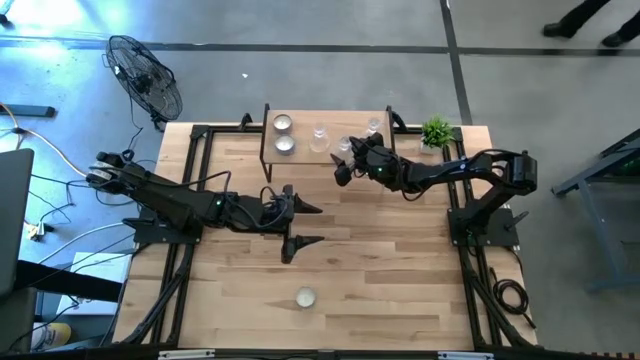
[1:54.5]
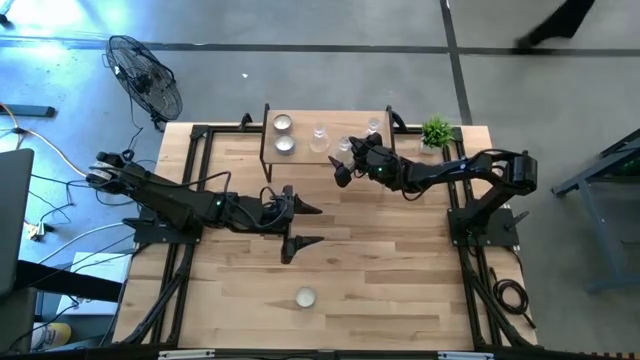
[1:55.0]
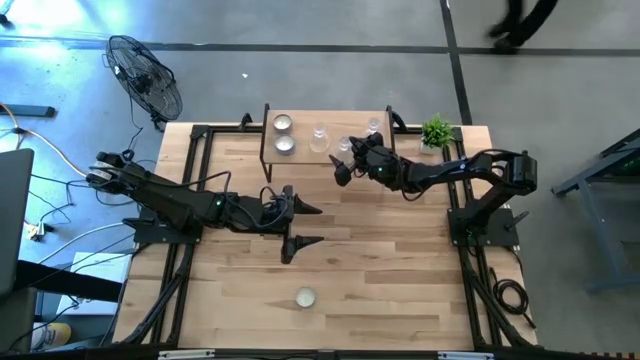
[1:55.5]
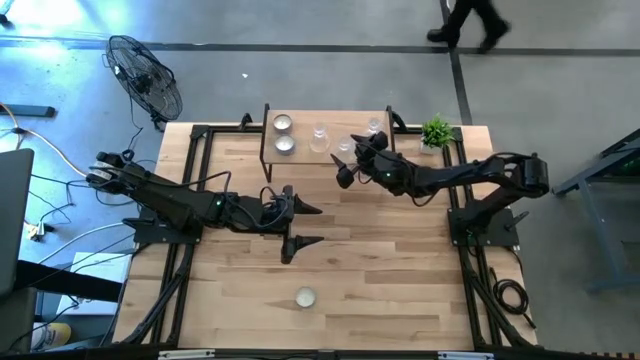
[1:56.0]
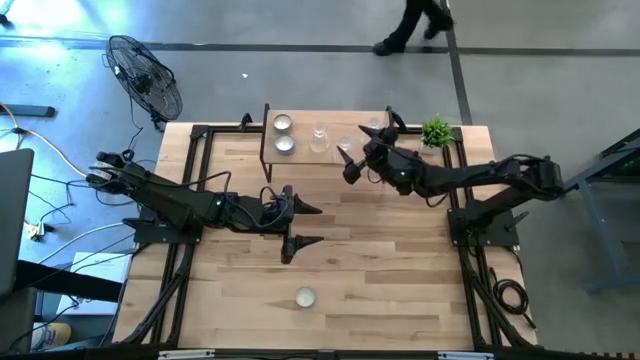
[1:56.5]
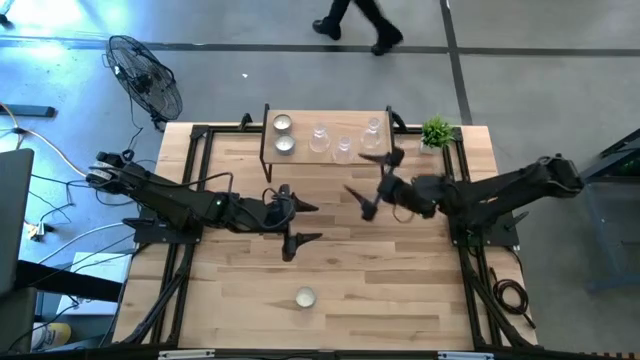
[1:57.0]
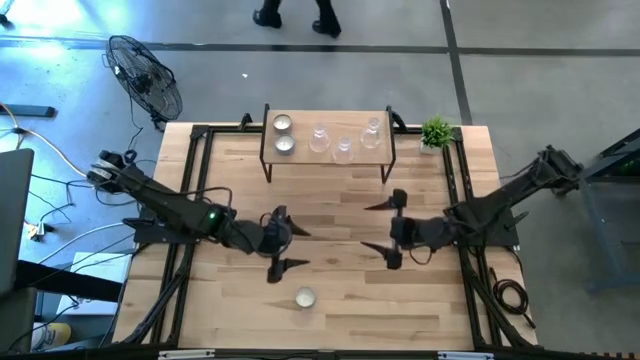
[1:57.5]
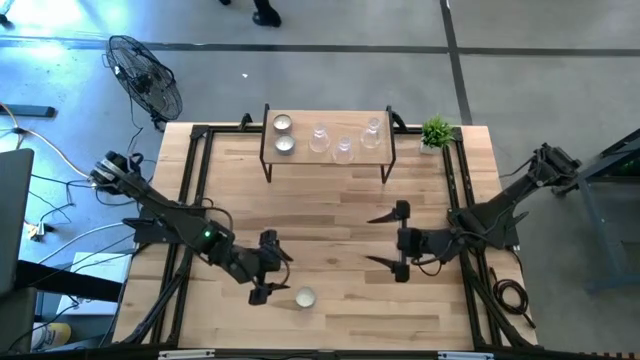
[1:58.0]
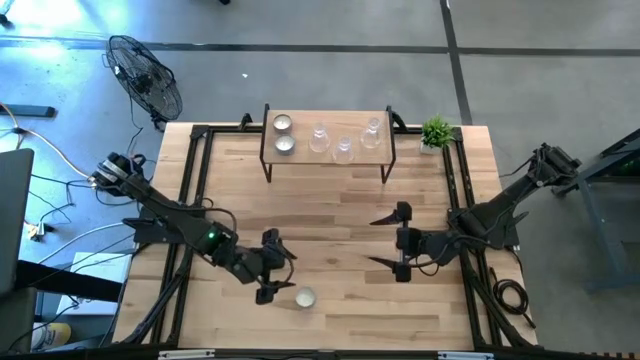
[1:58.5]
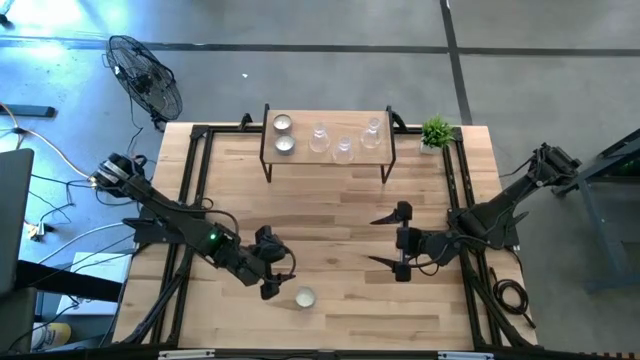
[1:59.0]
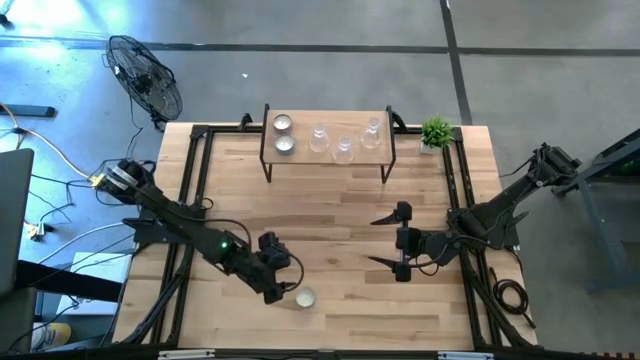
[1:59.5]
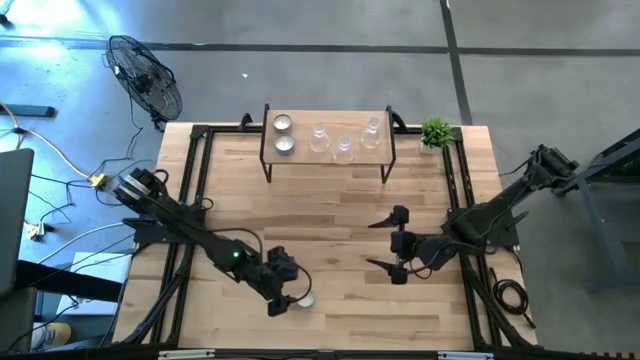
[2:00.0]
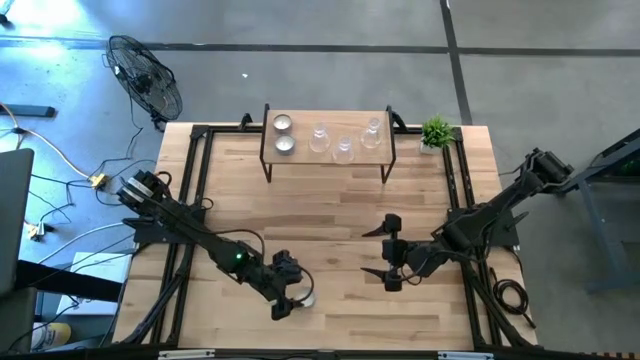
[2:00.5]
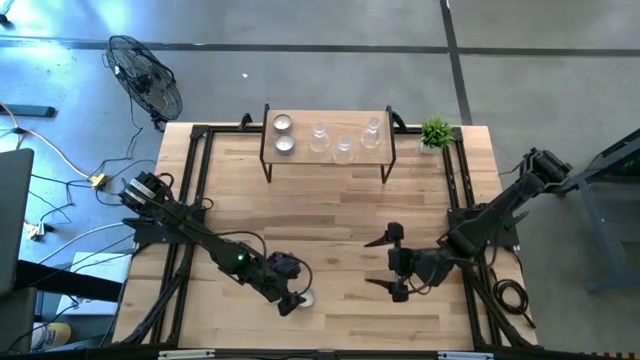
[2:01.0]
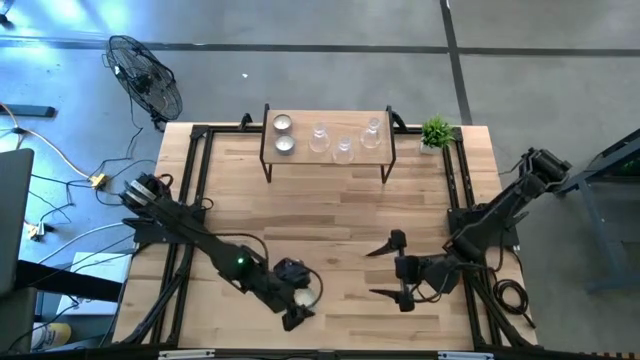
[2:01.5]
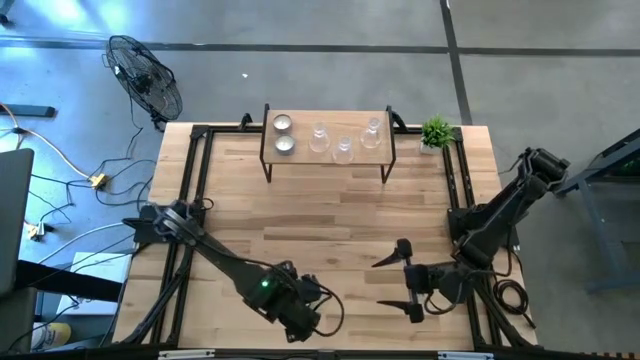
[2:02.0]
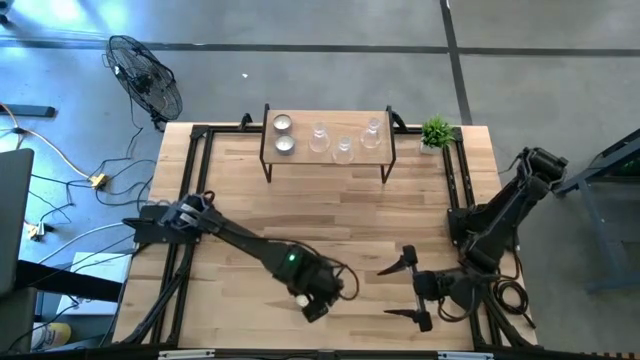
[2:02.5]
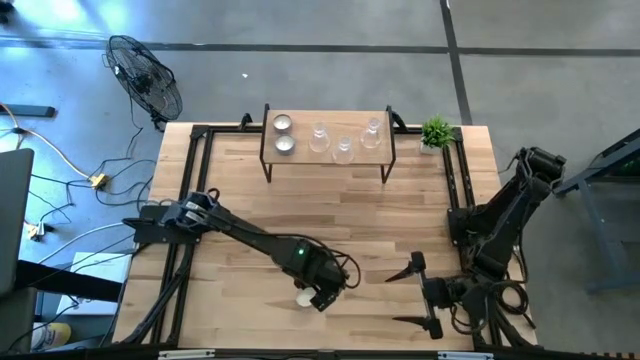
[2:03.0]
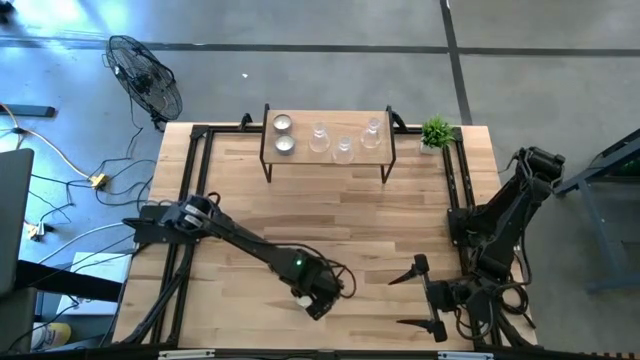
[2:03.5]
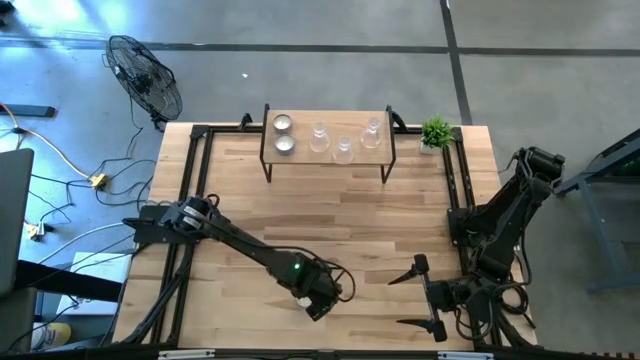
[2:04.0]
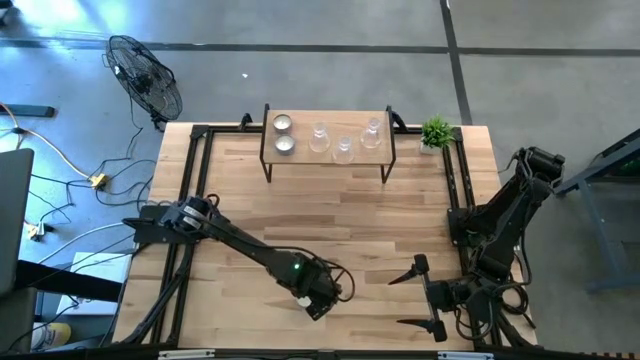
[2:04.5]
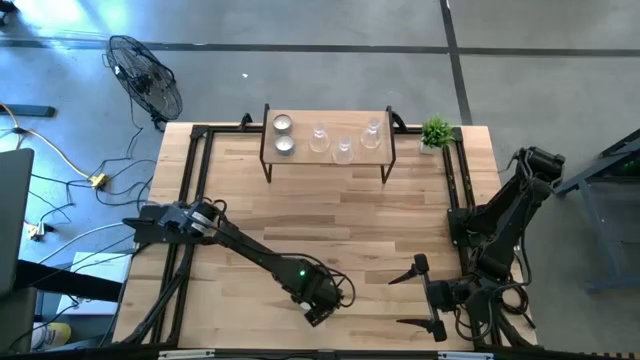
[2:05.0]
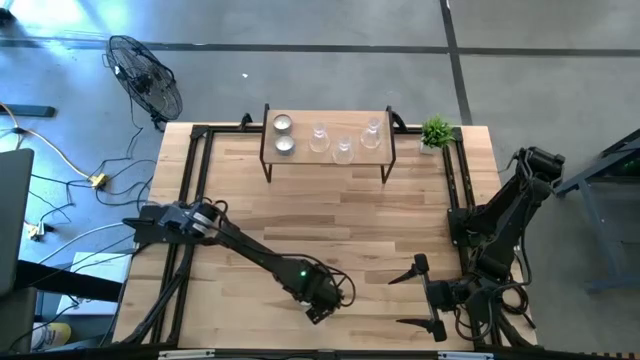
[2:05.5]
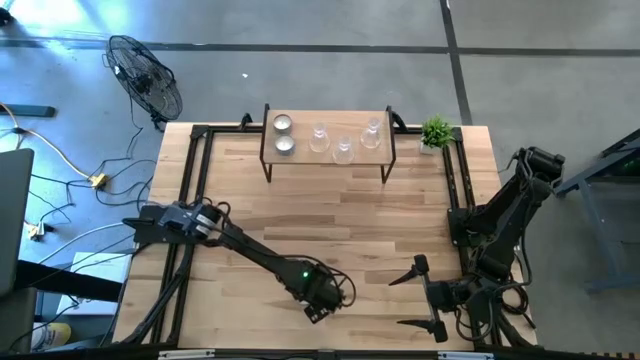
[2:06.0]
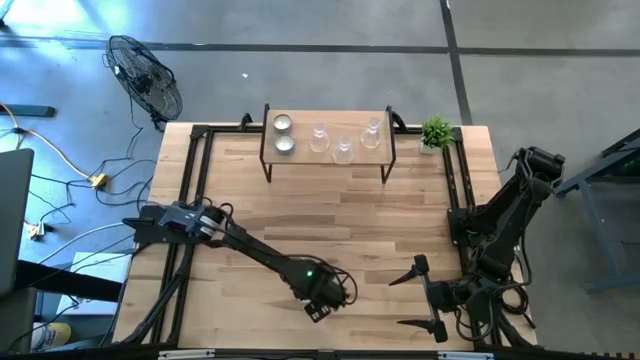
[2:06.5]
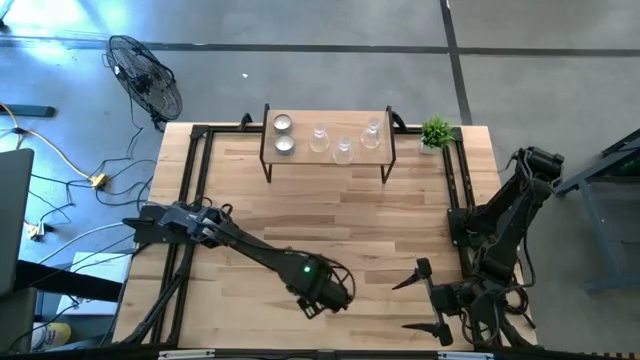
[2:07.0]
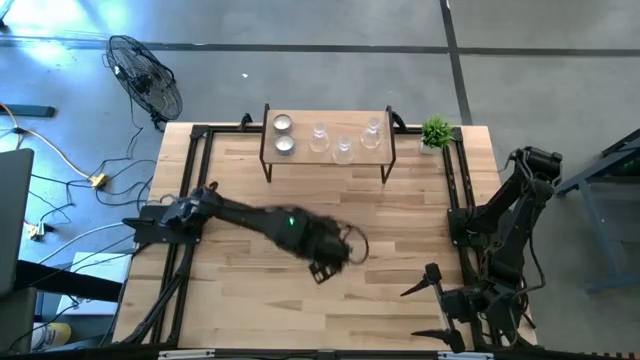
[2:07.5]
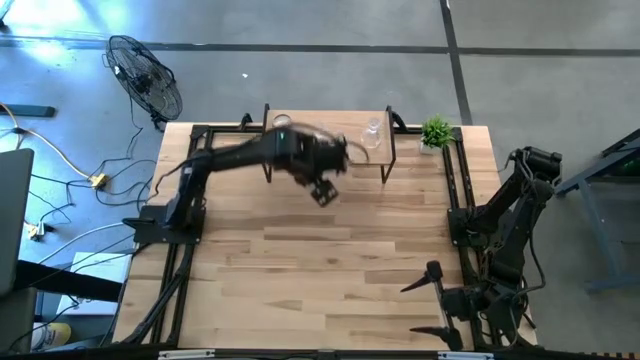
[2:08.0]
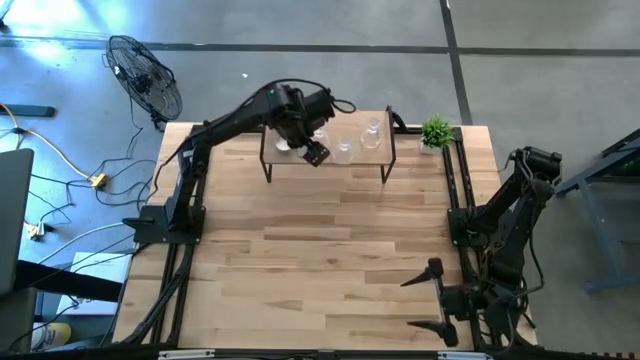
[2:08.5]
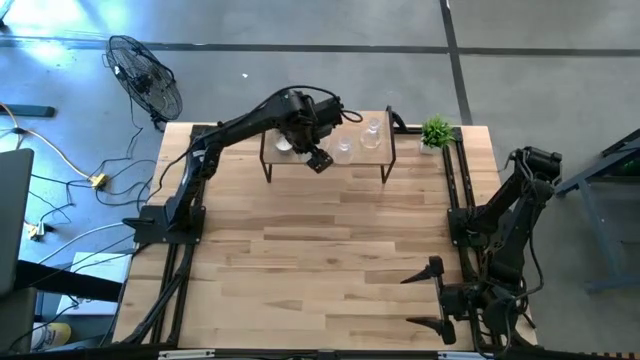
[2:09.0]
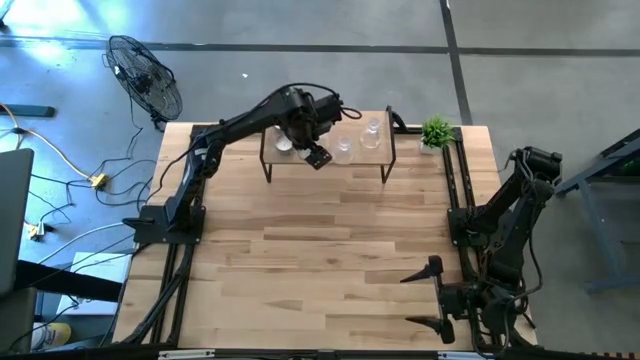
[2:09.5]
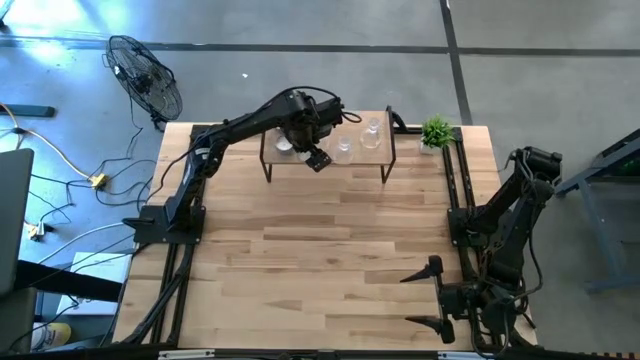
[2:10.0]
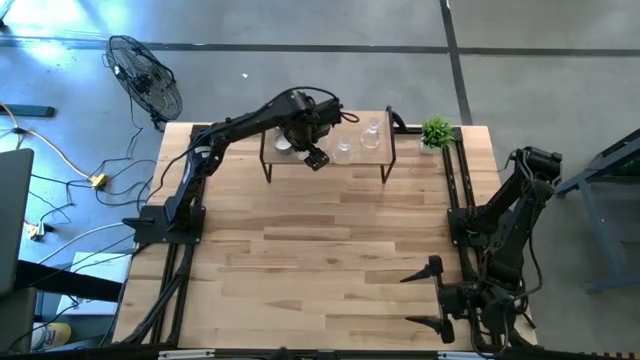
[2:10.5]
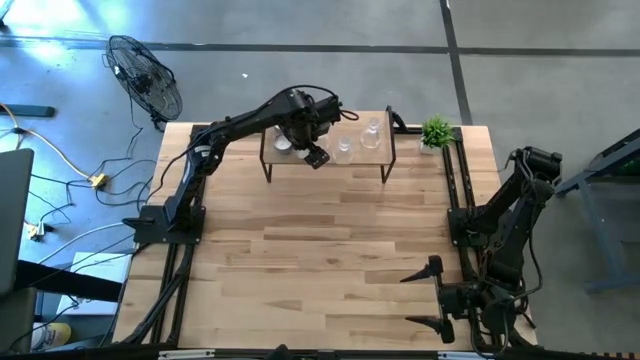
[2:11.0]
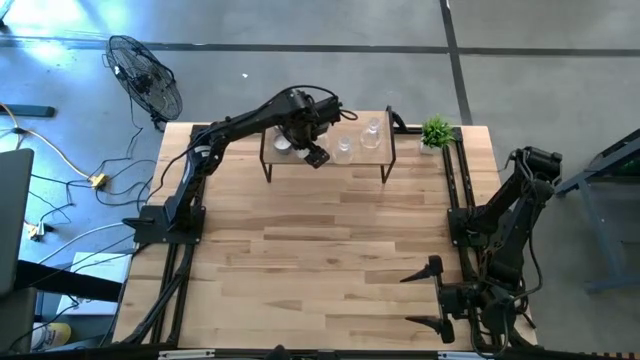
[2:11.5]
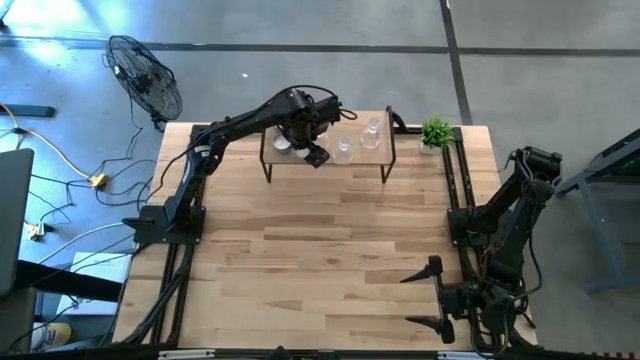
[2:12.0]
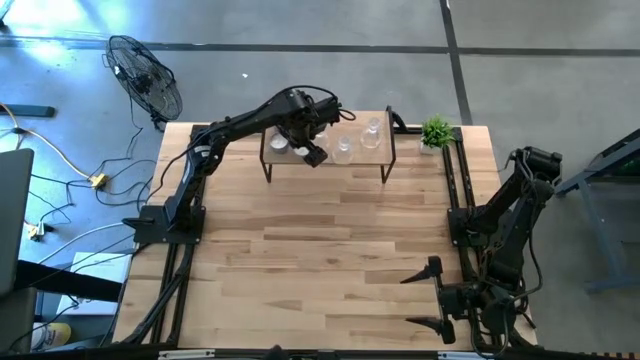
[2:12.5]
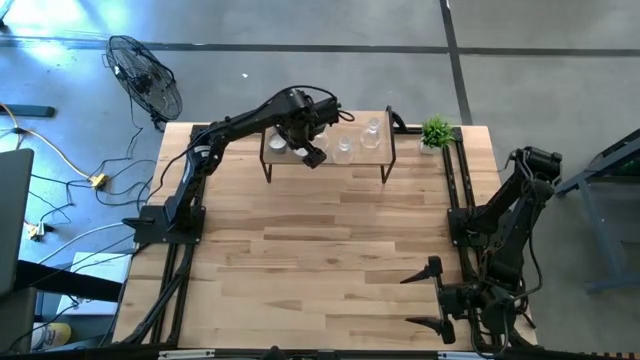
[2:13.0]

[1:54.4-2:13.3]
Task: Pick & Place candle stick holders
Put the red patterned scented candle on the shelf

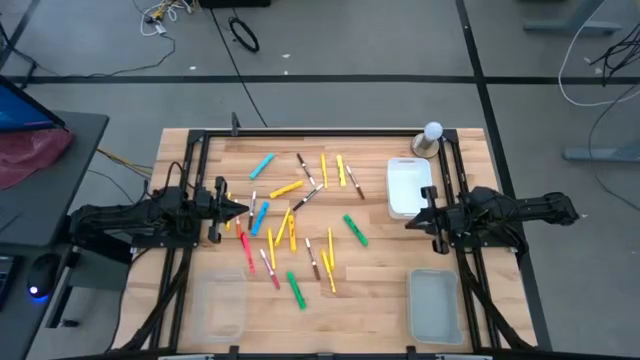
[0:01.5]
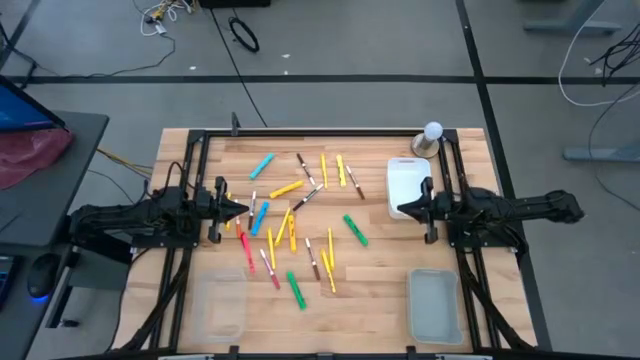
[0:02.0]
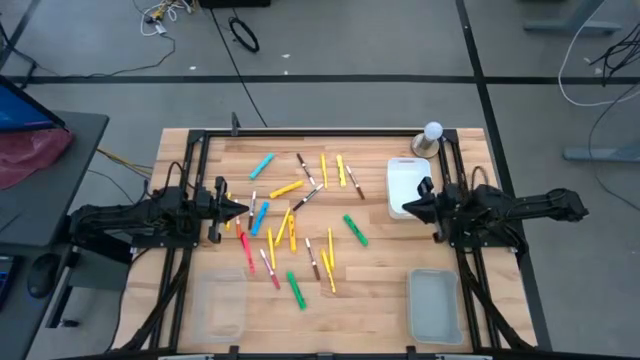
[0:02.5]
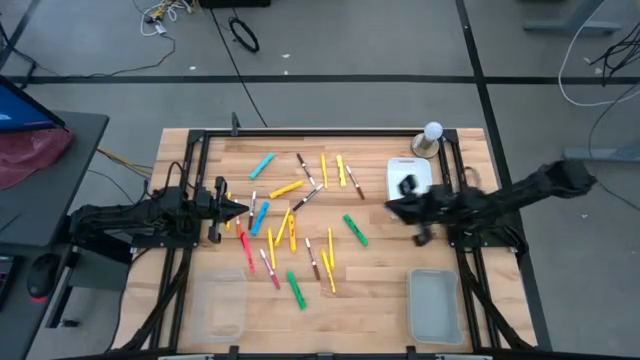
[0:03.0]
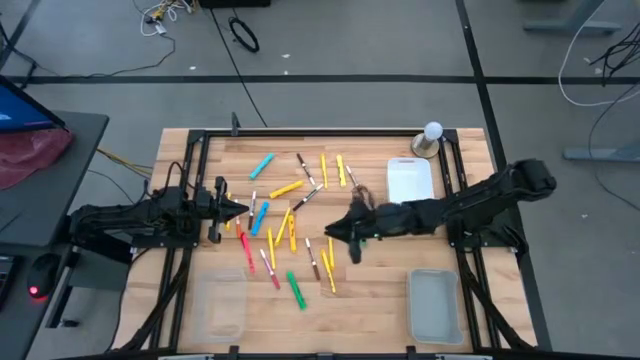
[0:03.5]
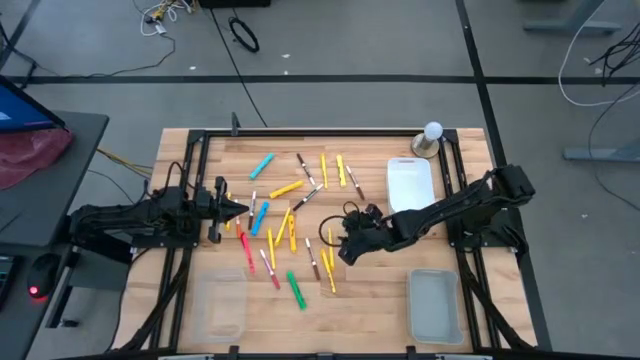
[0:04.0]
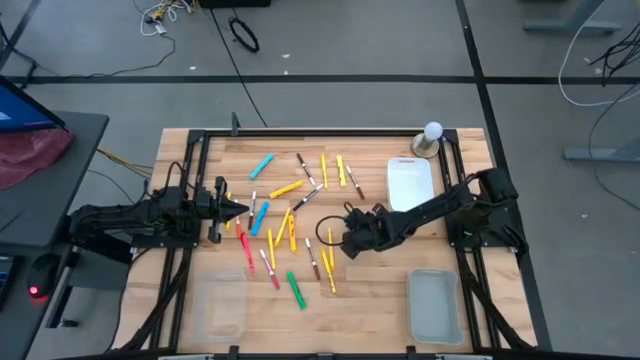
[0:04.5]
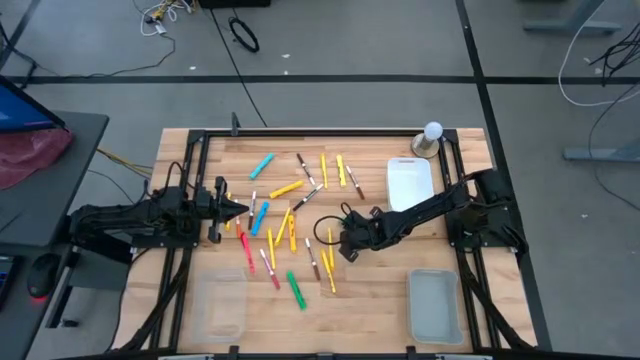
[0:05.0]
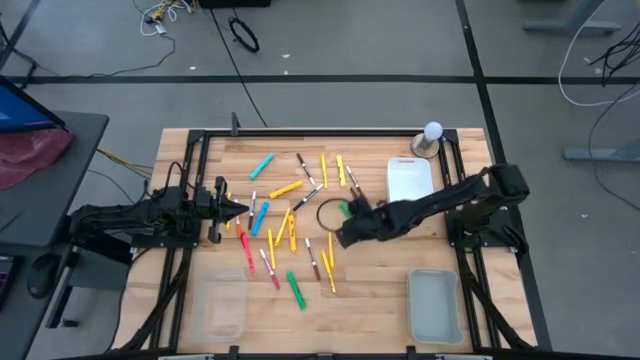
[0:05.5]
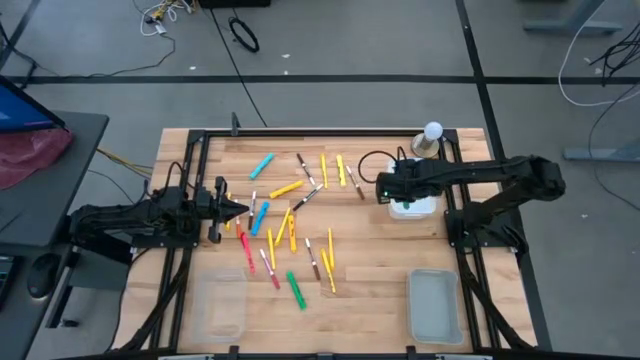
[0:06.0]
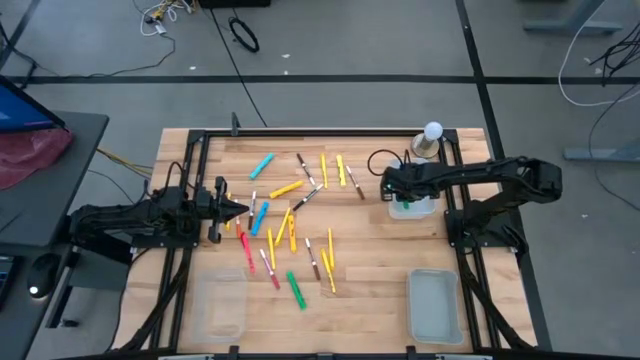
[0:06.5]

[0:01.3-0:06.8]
Task: Pick & Place Markers
Put the green highlighter into the white bin
